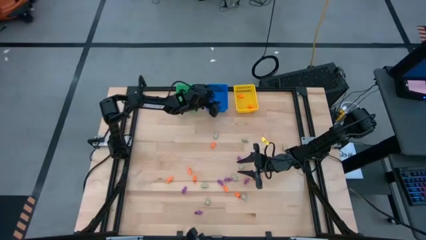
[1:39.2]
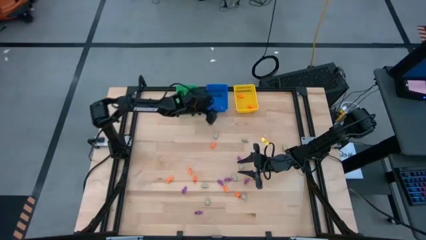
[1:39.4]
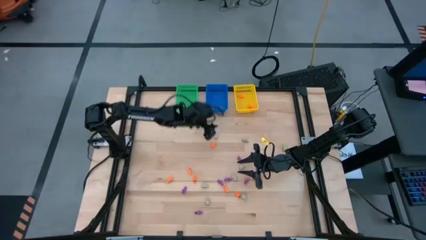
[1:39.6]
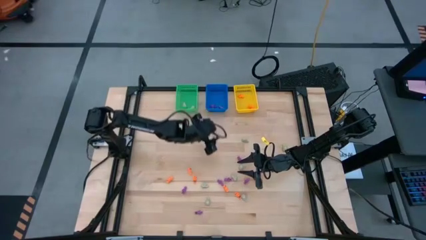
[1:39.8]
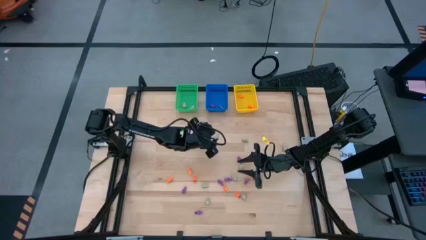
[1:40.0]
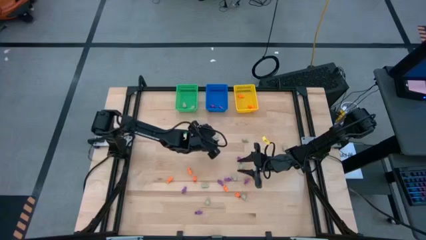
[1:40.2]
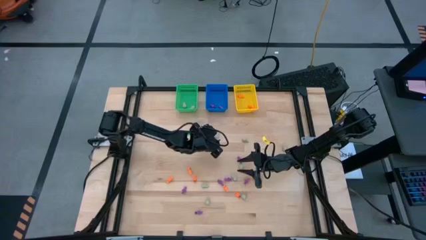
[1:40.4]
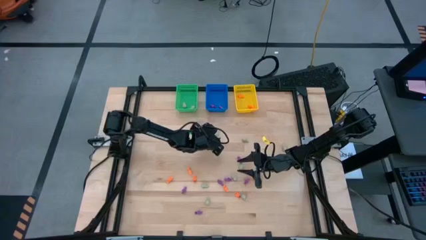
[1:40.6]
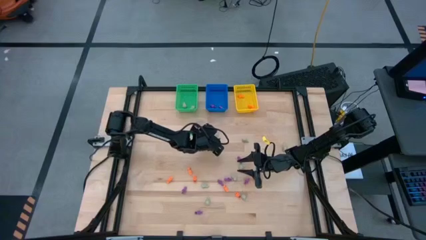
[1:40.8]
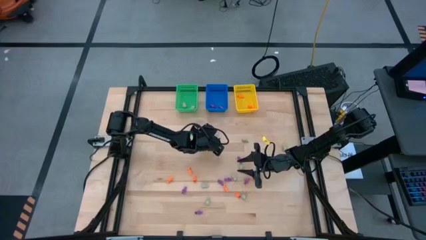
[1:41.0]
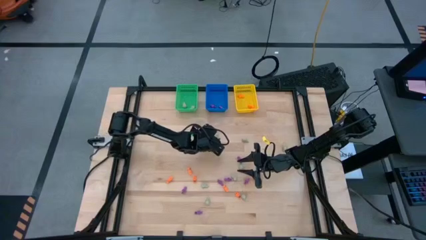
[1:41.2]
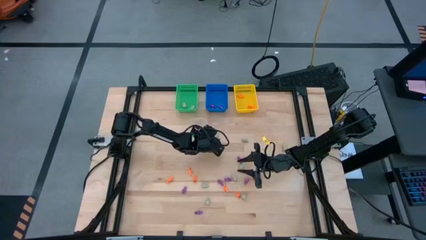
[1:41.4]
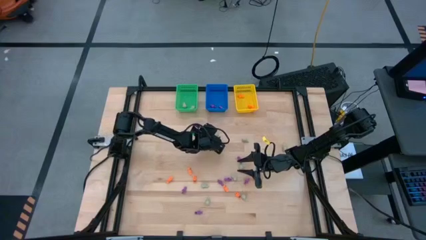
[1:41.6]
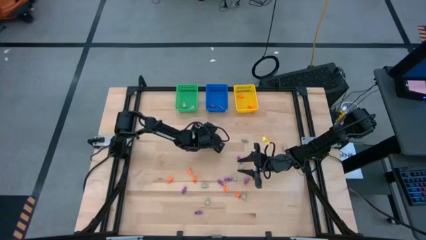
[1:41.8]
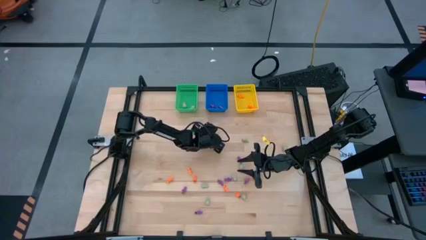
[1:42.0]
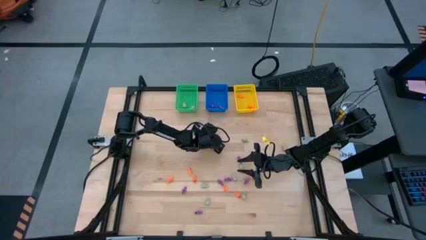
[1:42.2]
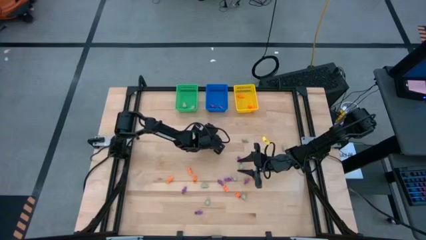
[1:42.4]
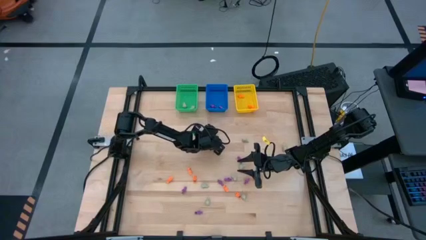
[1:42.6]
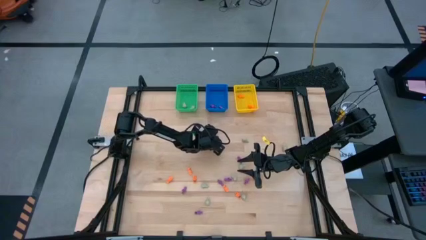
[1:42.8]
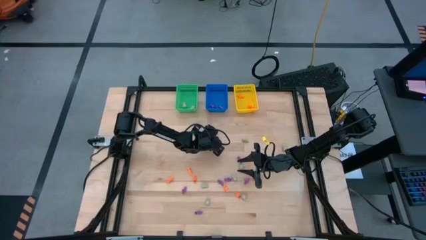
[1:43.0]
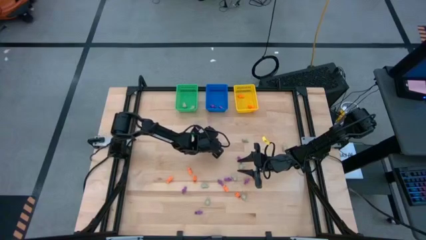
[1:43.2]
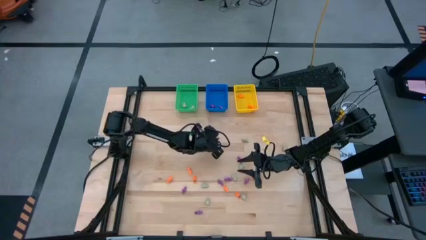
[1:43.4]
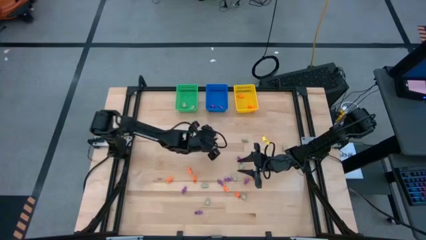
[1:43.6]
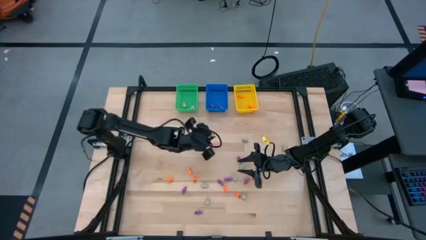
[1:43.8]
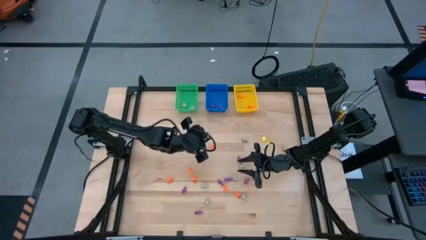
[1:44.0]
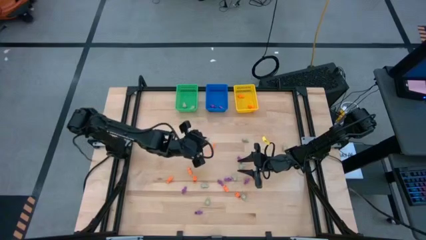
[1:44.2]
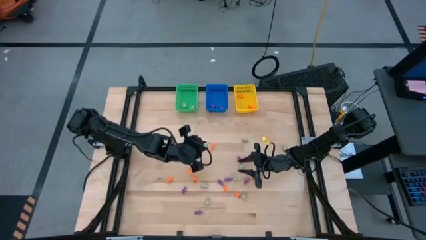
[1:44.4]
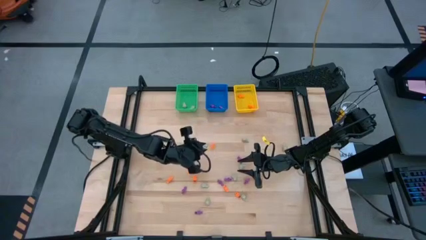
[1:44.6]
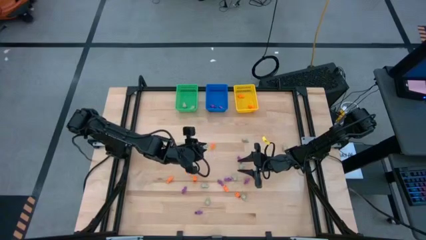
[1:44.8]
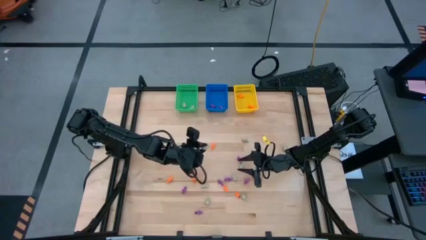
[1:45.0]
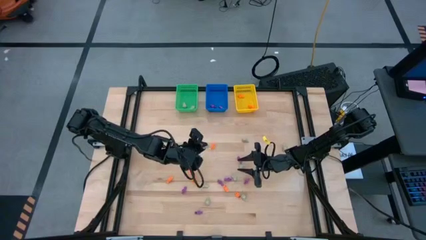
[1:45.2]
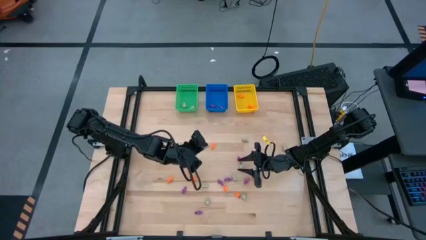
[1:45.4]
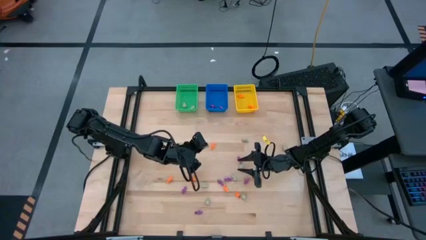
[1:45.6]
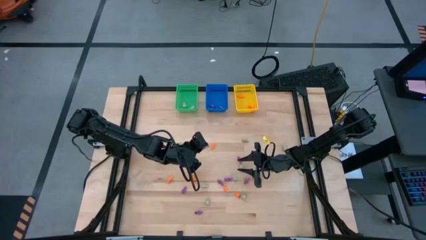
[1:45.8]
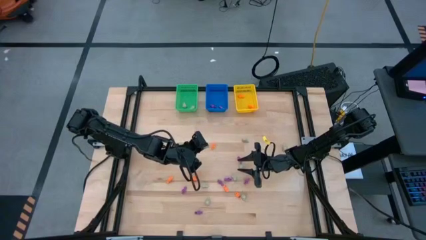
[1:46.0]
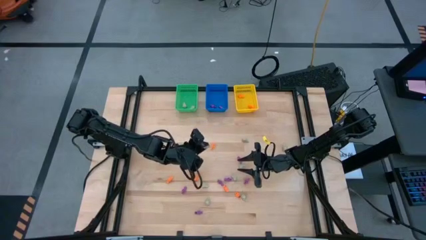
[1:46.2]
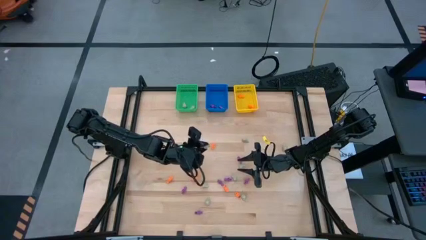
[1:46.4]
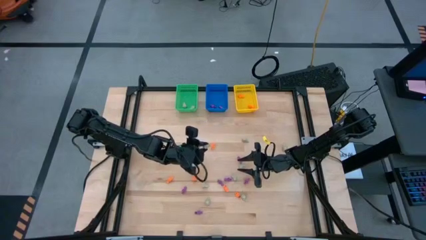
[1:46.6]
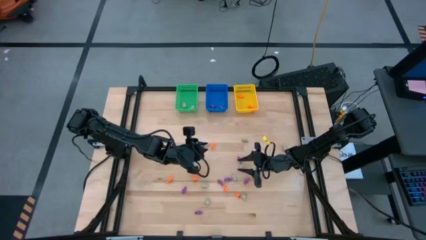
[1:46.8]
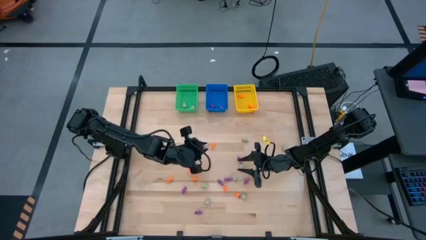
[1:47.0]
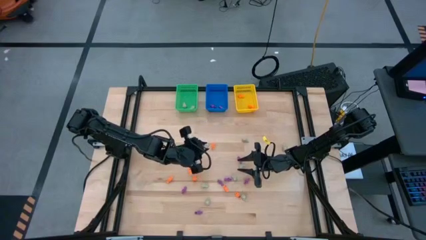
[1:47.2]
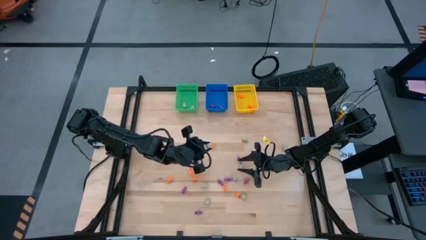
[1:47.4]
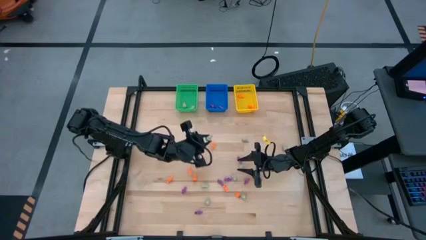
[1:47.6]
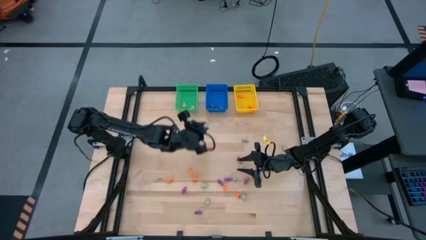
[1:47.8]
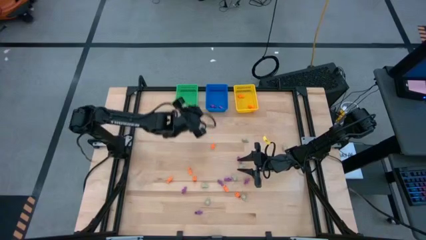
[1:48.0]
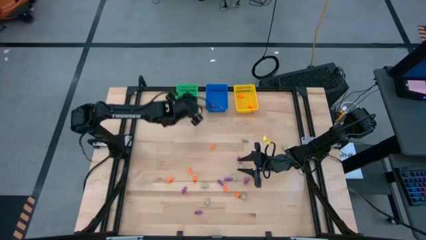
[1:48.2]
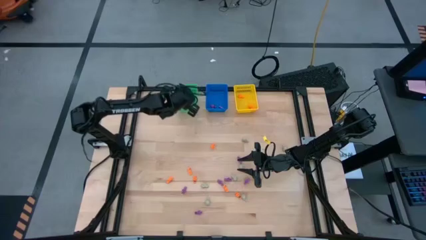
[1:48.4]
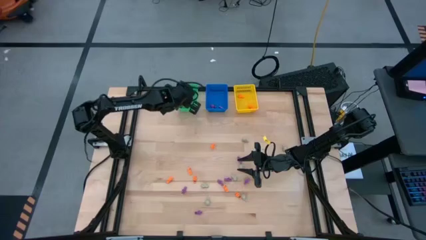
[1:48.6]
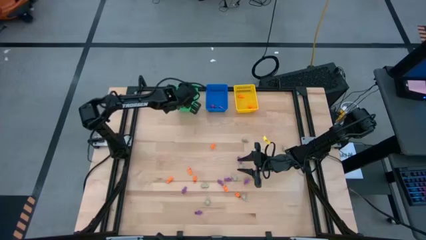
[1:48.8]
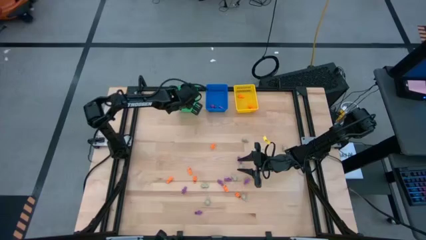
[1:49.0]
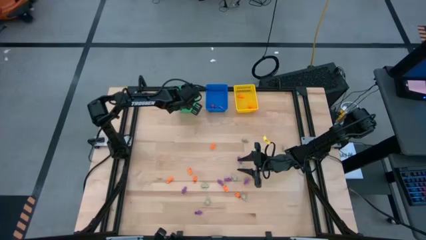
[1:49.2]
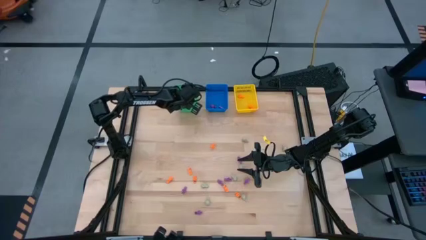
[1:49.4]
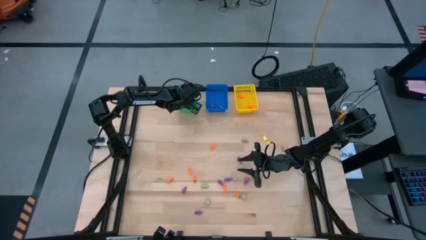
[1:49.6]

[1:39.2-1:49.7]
Task: Sort Halloween decoration
Put the gray skull toy into the green bin

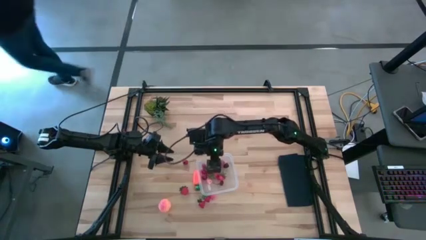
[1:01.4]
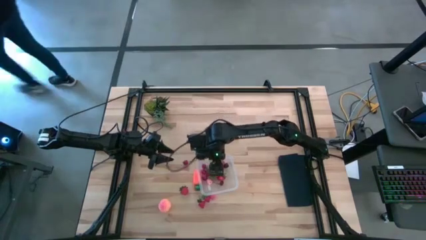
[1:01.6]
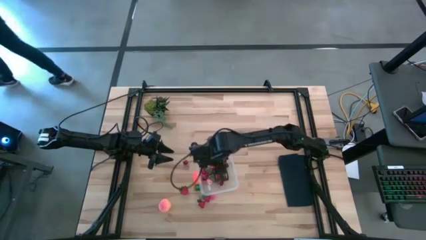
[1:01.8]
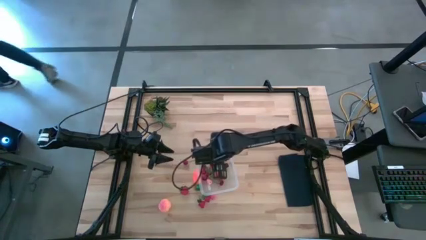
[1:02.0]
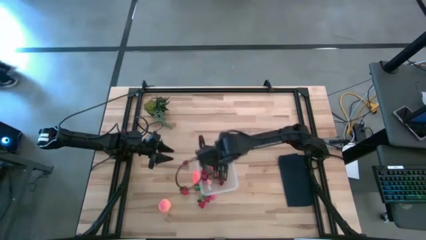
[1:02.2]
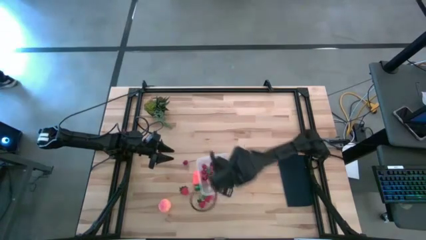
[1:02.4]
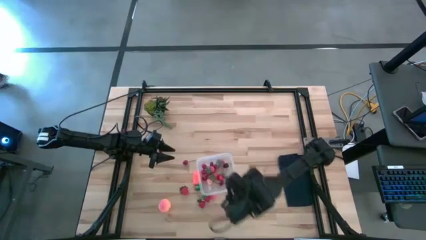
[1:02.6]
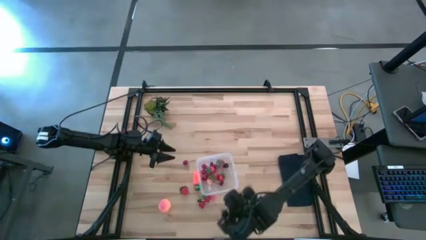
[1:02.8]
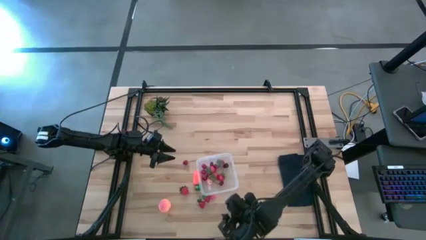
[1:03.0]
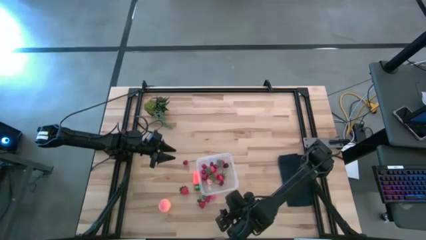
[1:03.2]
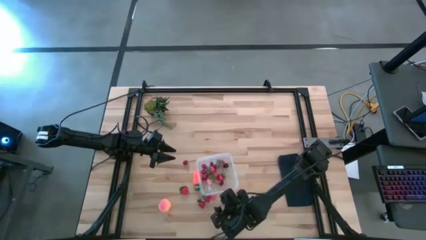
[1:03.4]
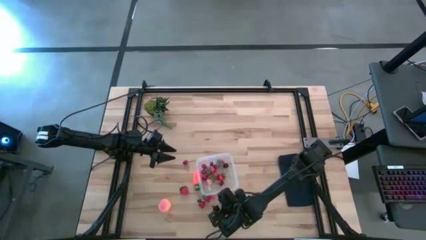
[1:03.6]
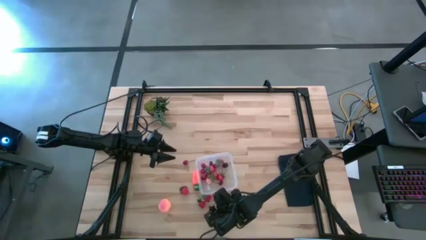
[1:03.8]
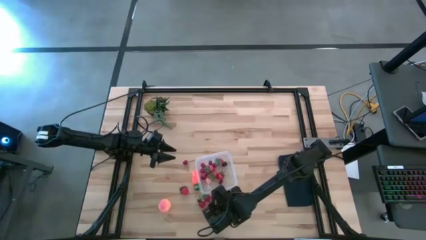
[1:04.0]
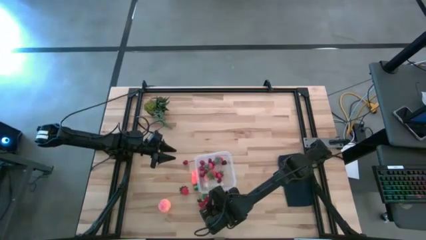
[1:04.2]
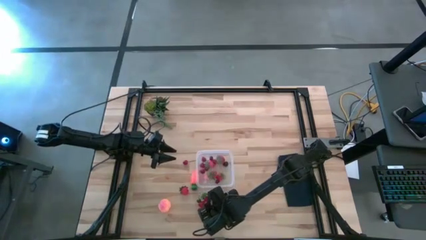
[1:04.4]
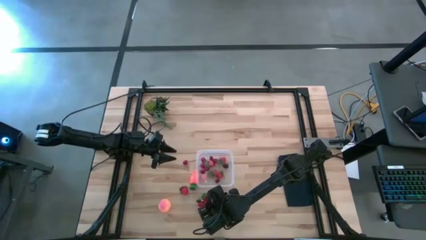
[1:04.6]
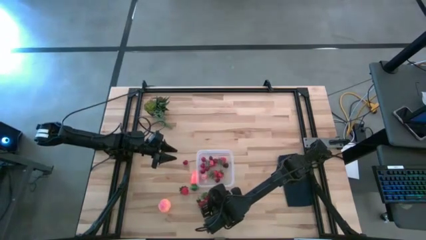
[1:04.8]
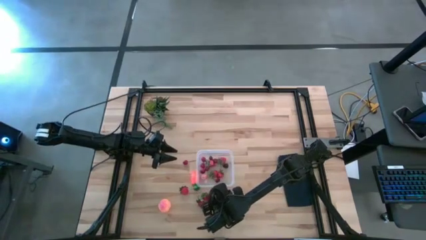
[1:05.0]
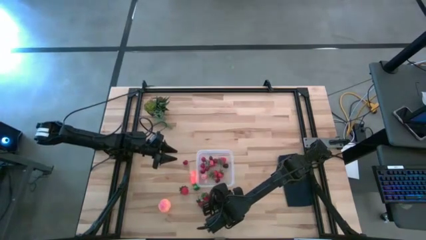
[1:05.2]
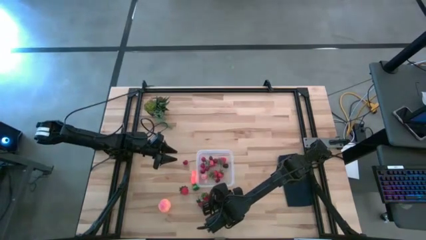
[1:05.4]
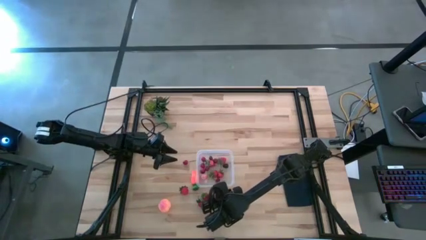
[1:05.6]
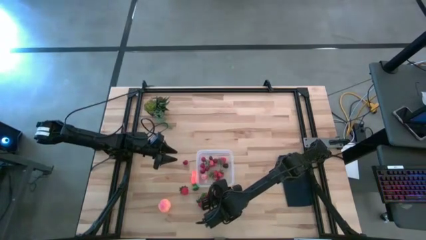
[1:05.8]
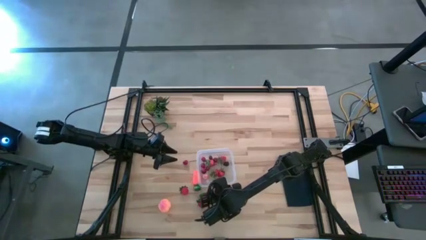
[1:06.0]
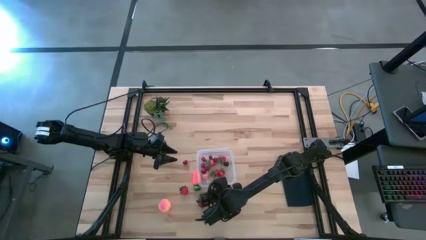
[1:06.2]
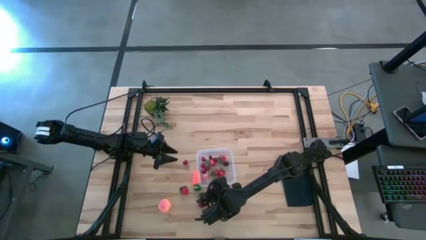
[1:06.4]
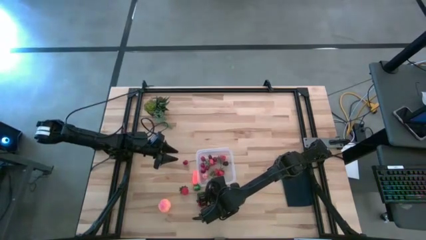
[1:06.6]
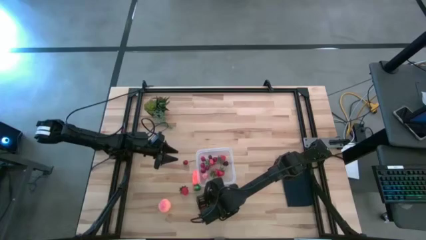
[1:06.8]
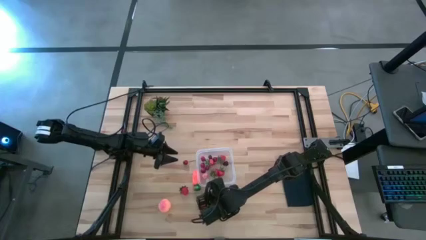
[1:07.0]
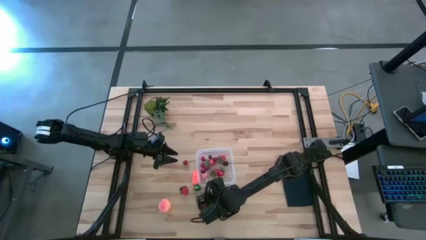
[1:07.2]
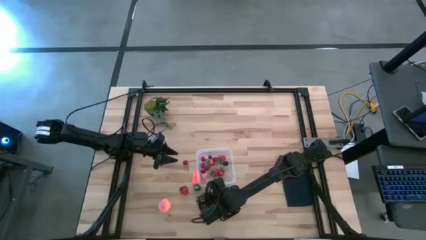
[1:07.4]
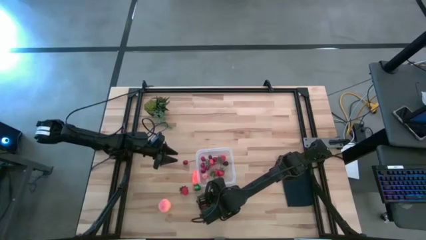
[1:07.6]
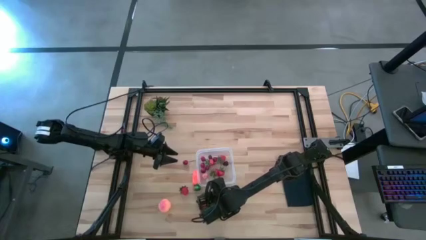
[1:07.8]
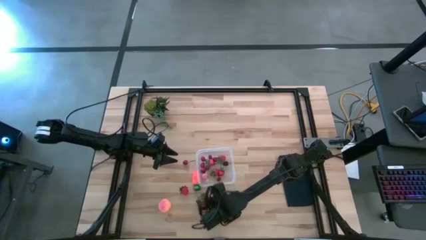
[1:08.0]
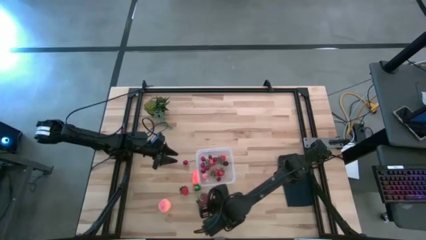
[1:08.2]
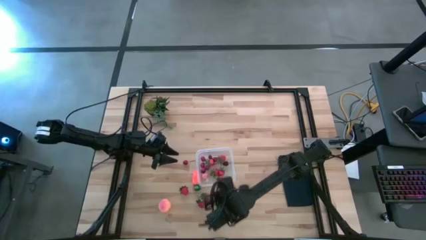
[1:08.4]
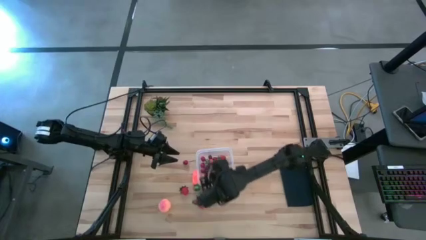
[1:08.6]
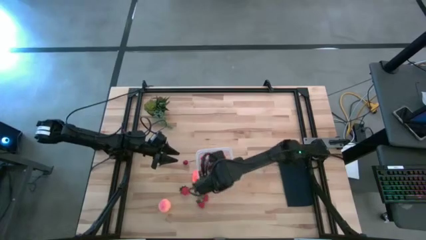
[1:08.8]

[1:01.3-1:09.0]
Task: Pick and placing Produce into tupperware
Put the peach into the transparent container
